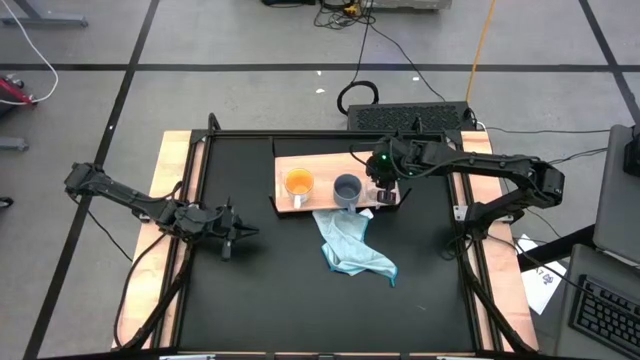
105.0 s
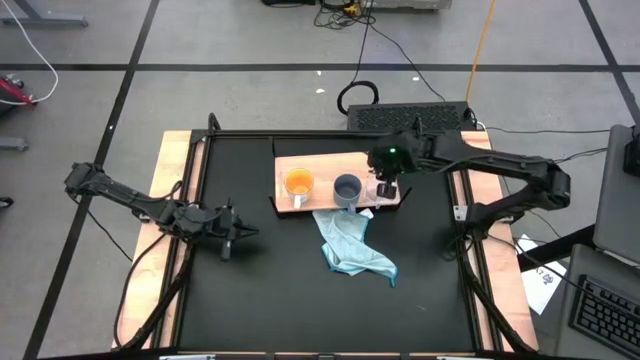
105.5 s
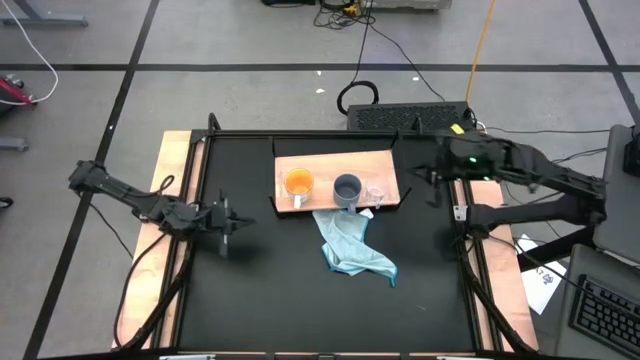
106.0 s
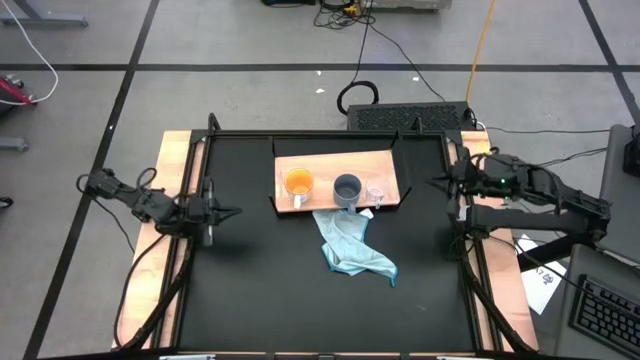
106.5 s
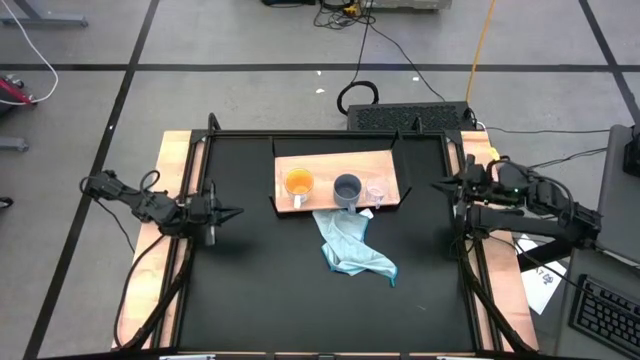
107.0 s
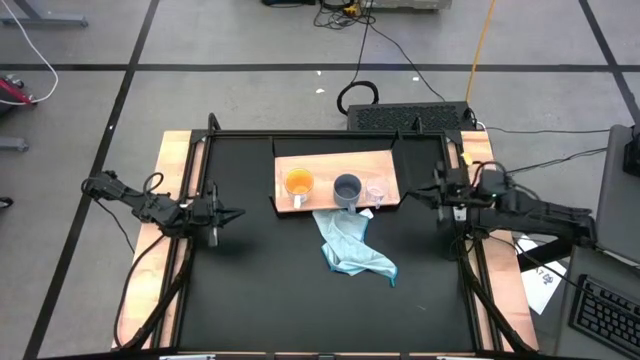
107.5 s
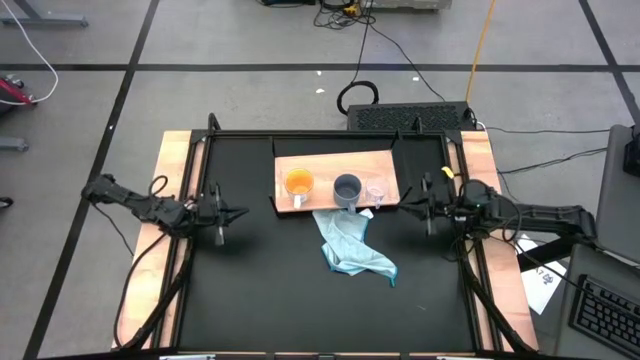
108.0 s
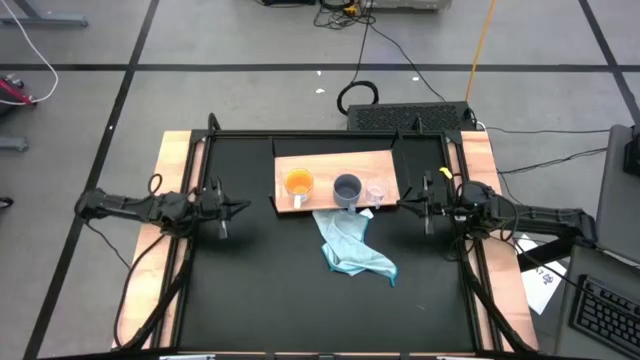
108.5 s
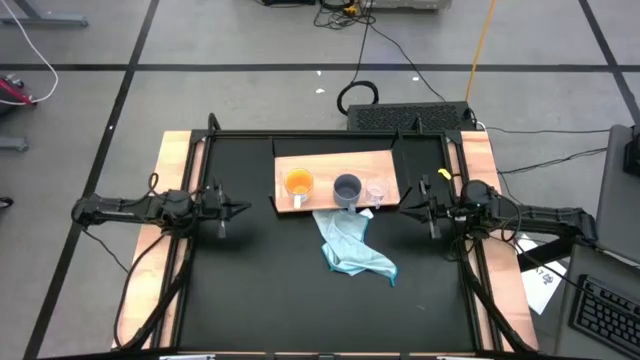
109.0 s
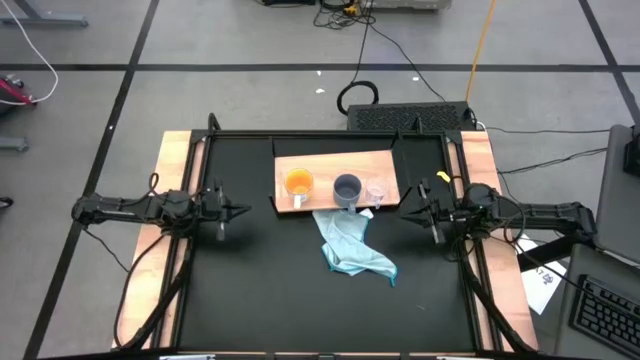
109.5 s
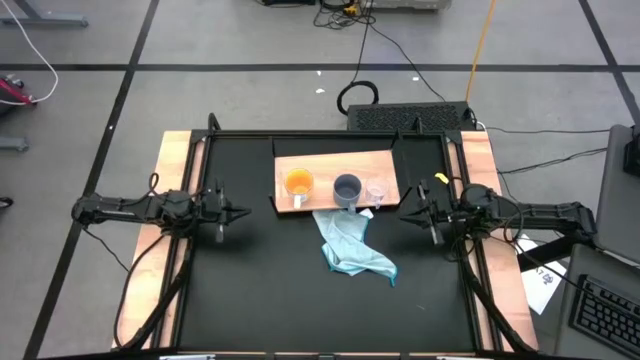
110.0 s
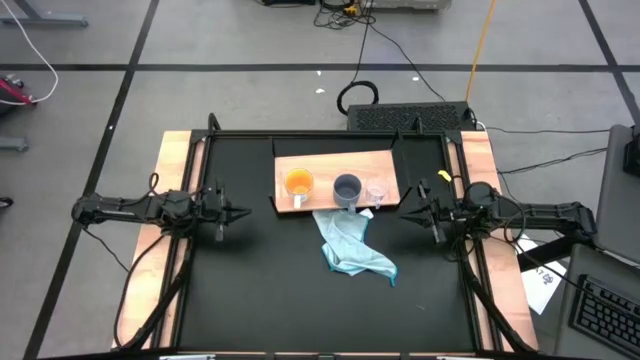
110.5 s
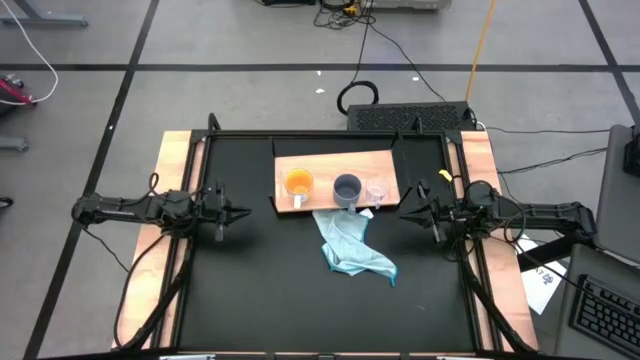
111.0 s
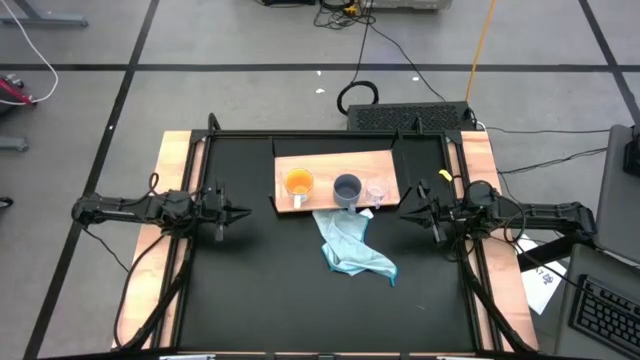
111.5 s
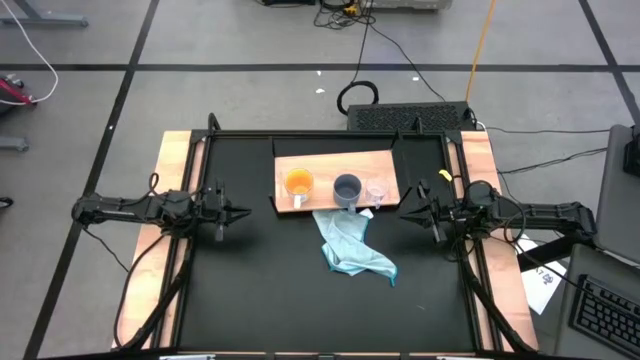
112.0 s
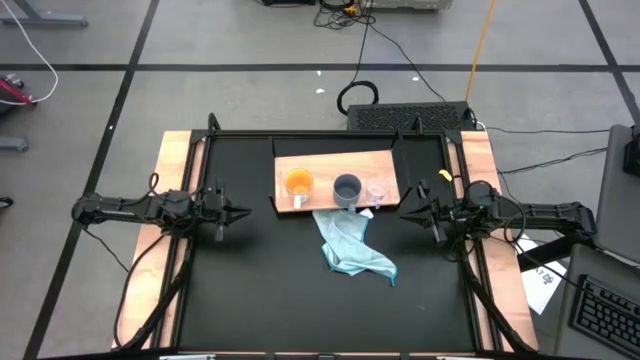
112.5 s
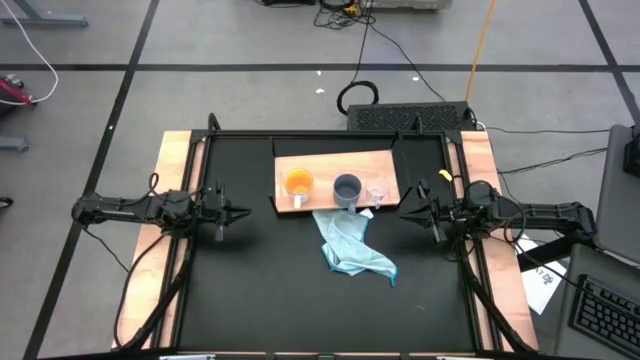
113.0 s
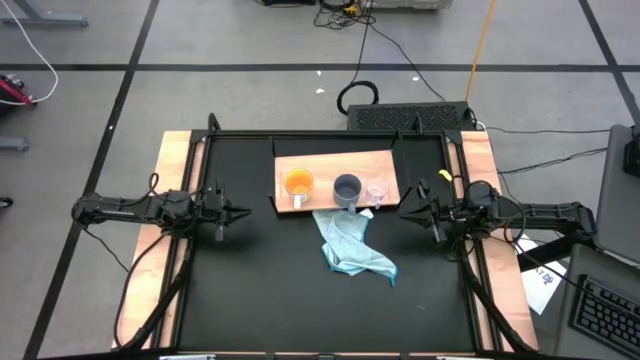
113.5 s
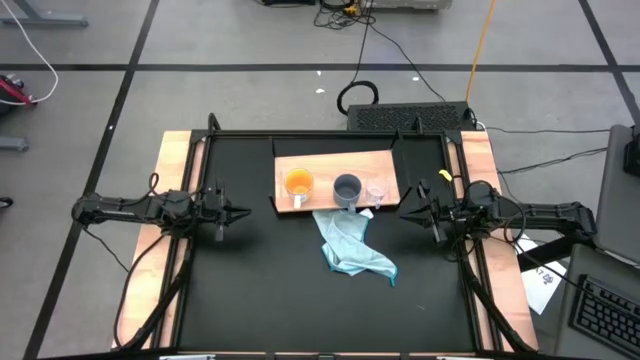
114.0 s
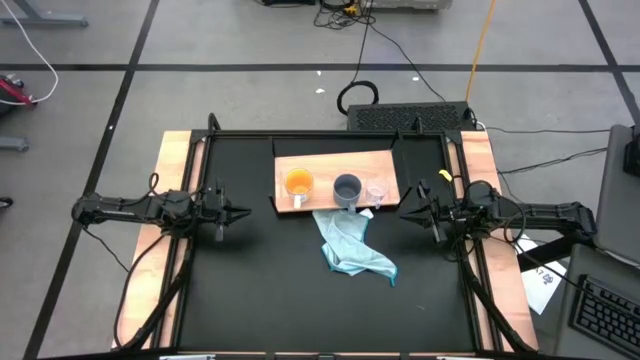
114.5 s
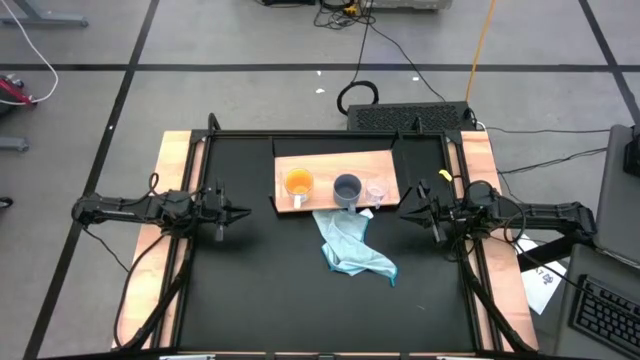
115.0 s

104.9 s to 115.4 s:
Task: Stack small to large cups/mugs on shelf
Return to Home Position

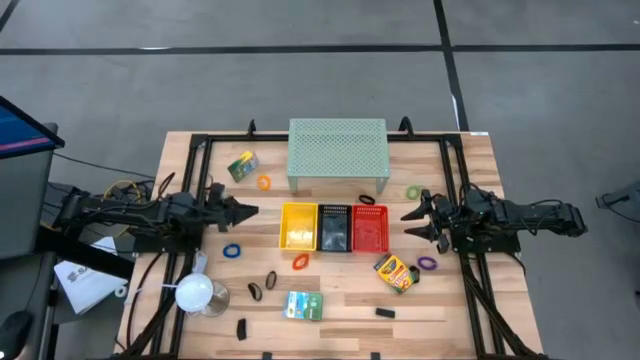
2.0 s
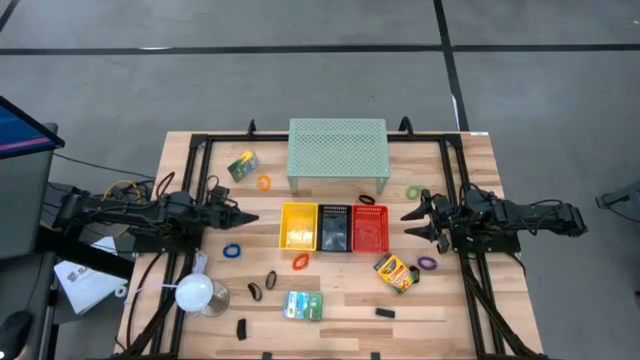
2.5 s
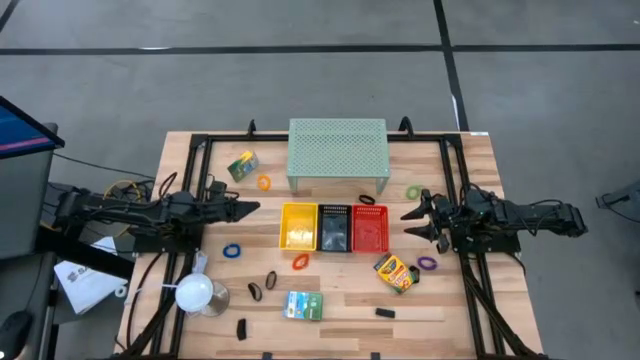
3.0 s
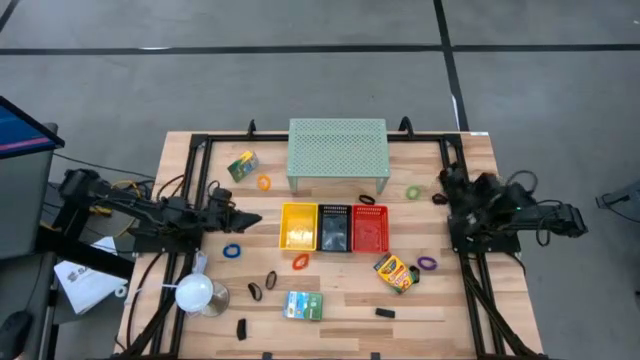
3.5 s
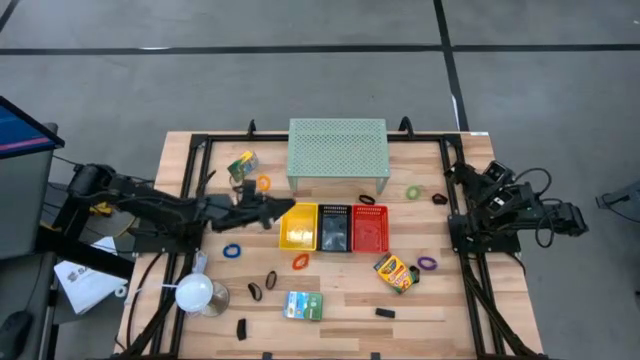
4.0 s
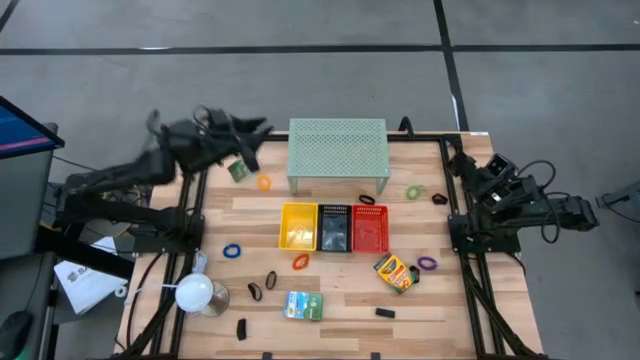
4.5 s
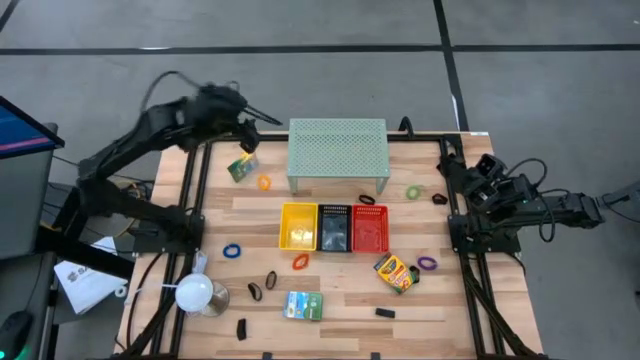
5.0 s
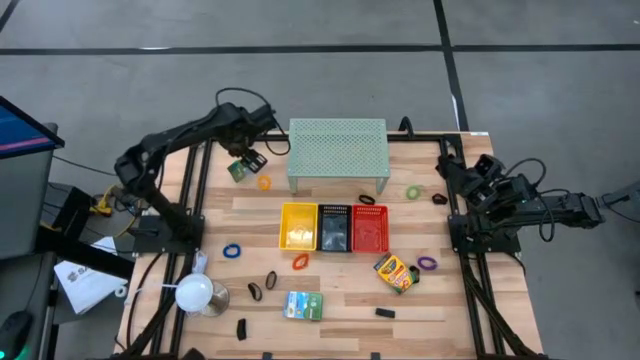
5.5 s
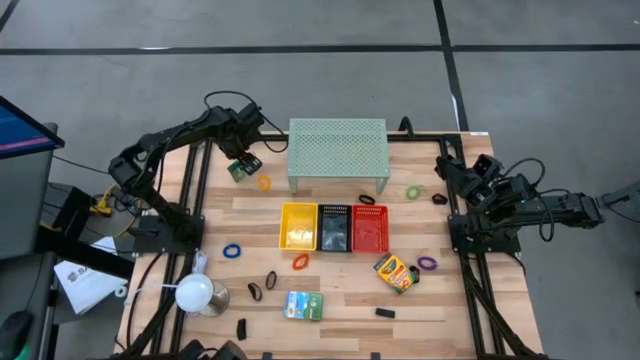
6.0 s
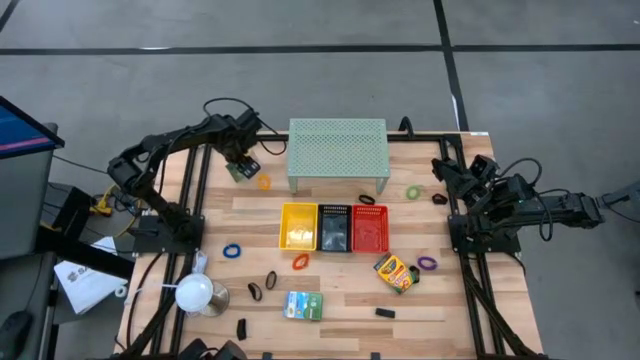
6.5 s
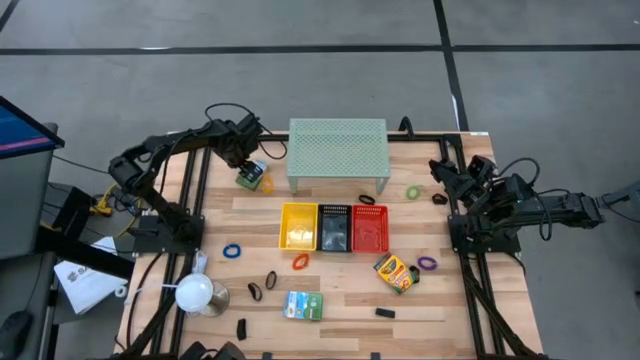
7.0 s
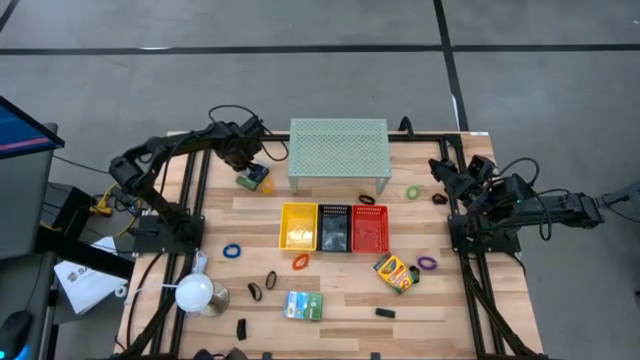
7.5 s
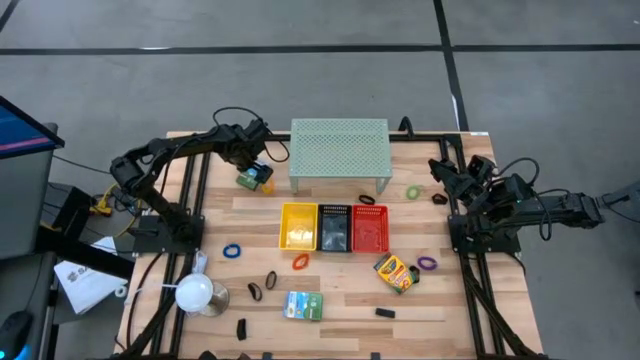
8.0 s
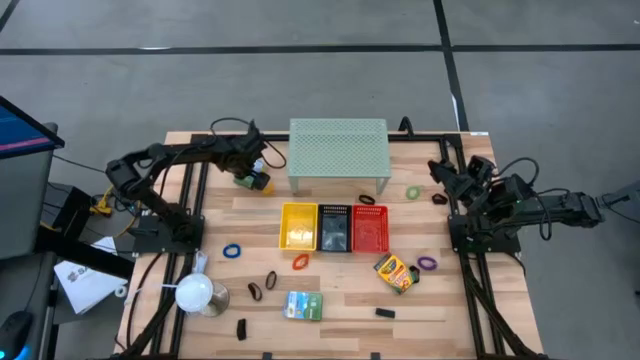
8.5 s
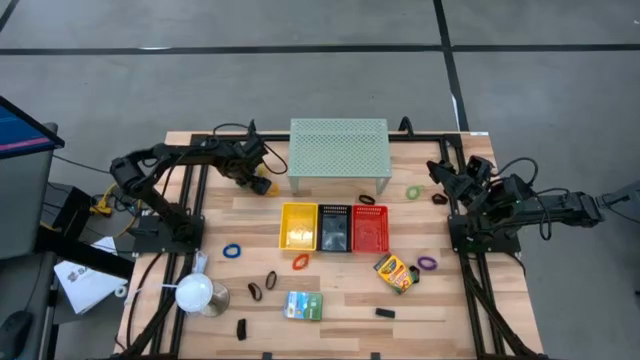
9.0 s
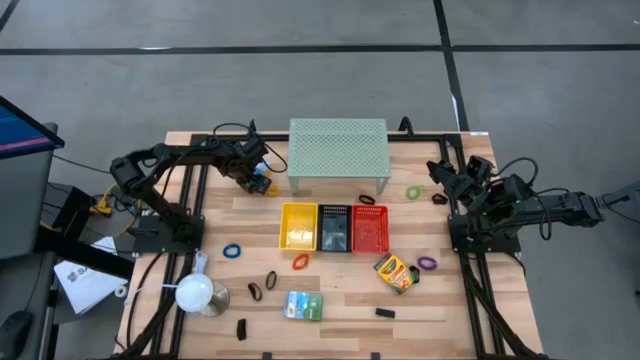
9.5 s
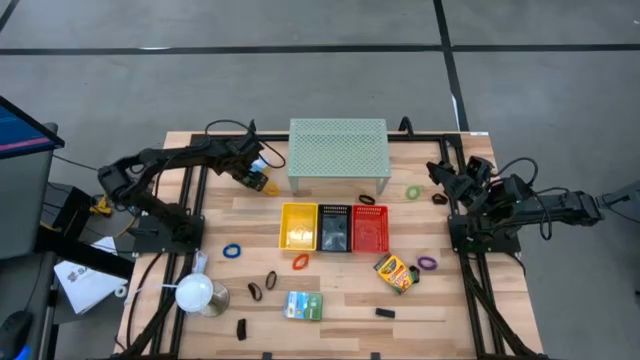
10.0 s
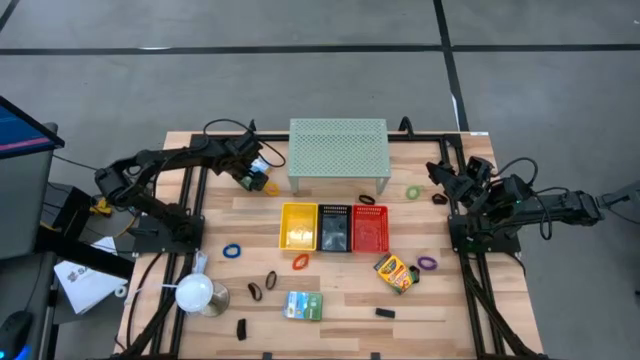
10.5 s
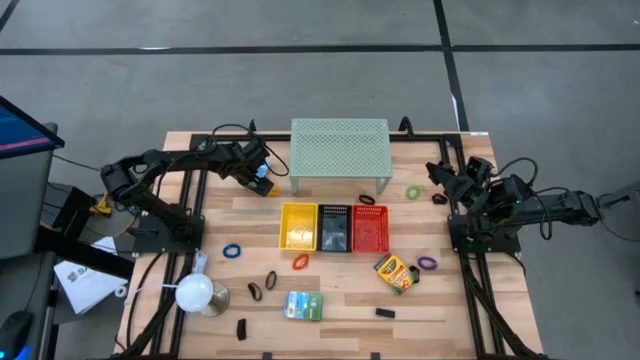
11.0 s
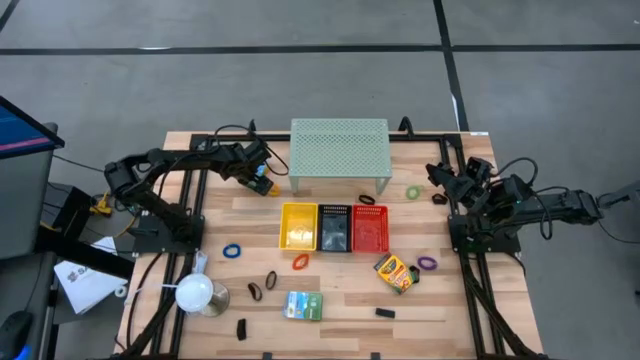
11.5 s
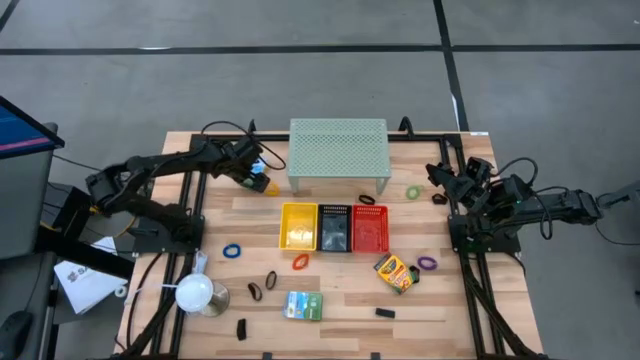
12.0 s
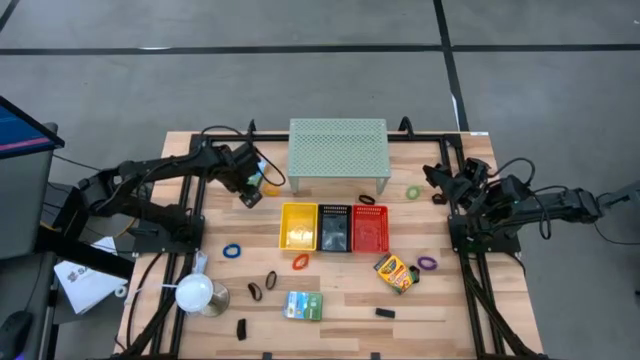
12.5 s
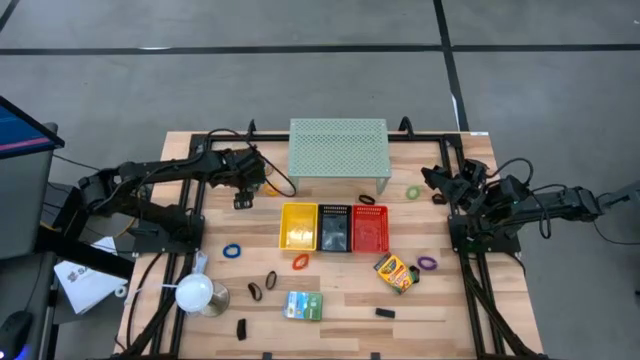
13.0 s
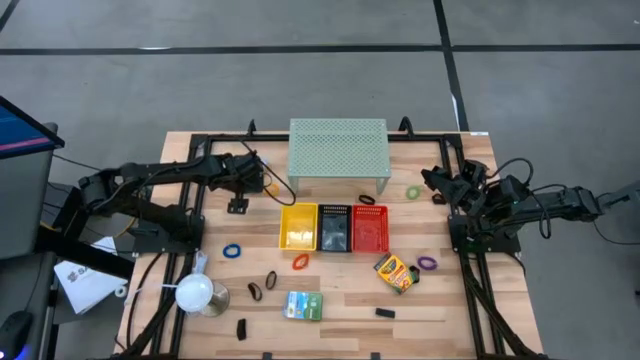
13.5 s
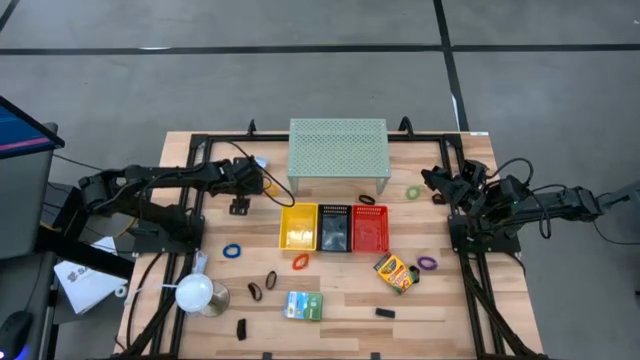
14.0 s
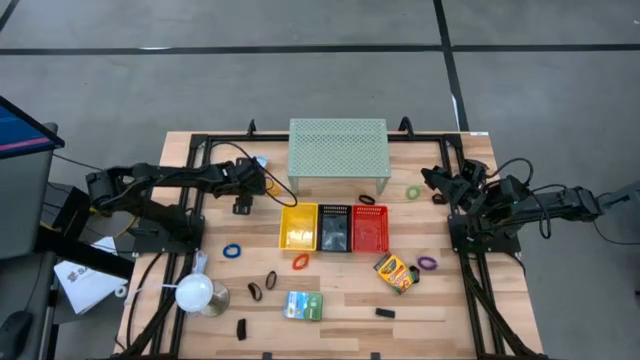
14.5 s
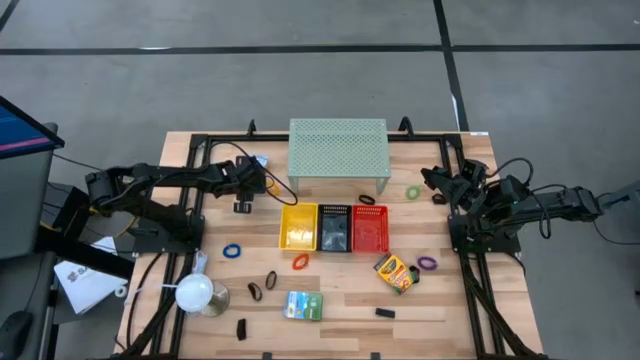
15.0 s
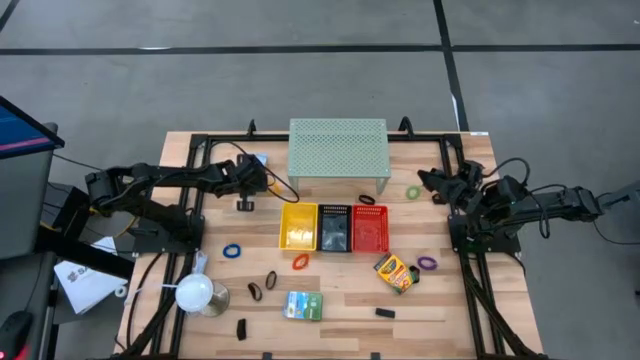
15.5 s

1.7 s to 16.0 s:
Task: Pick & Place Office Desk Supplies
Put the crayons box into the red bin
